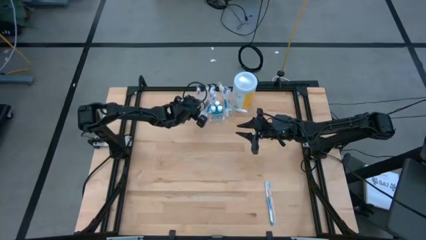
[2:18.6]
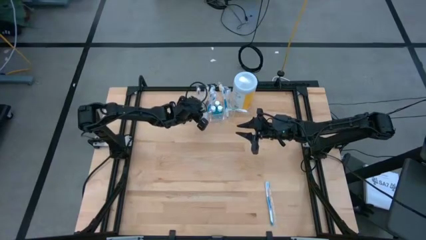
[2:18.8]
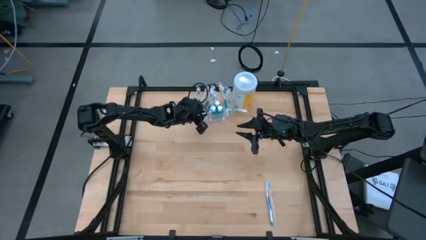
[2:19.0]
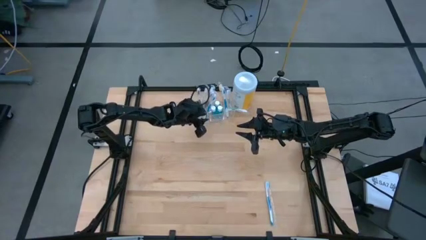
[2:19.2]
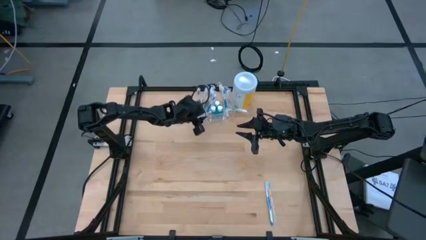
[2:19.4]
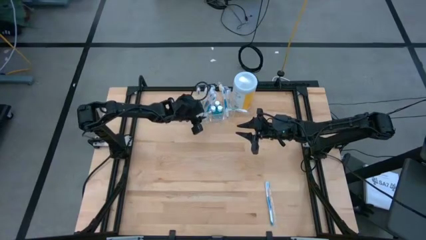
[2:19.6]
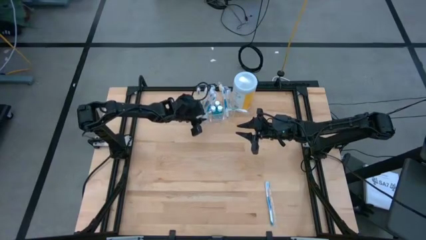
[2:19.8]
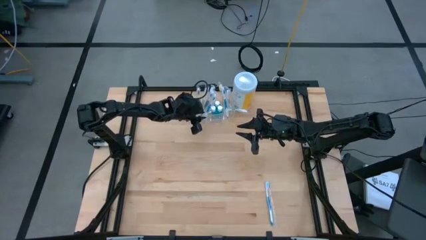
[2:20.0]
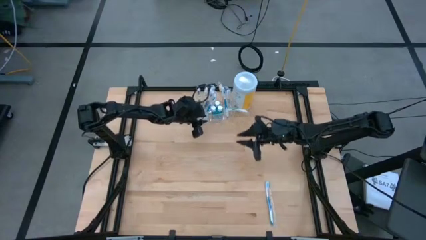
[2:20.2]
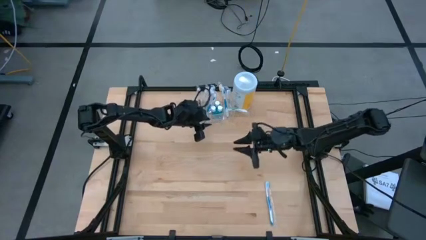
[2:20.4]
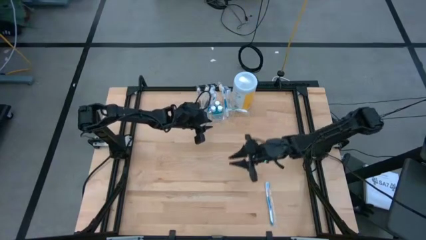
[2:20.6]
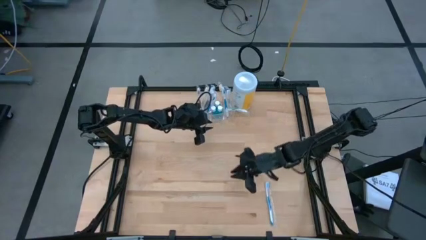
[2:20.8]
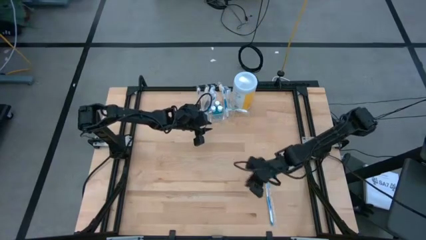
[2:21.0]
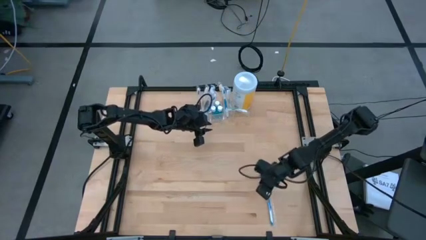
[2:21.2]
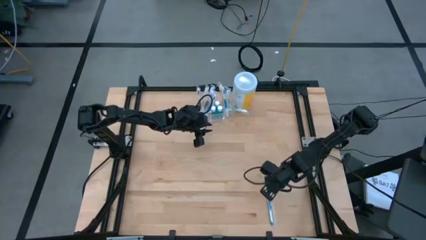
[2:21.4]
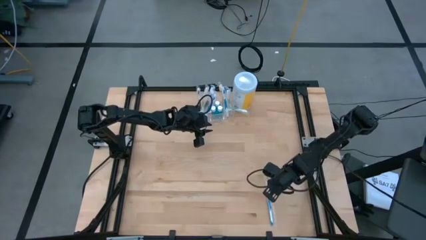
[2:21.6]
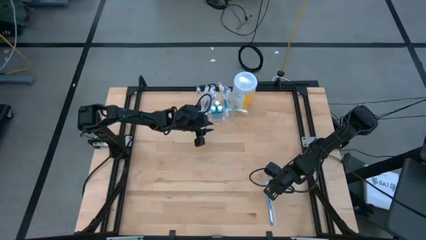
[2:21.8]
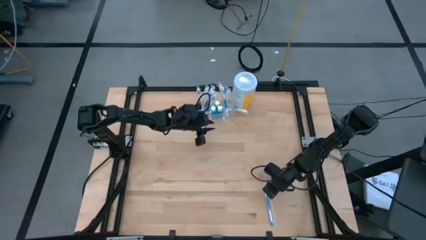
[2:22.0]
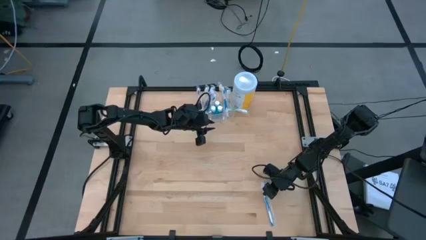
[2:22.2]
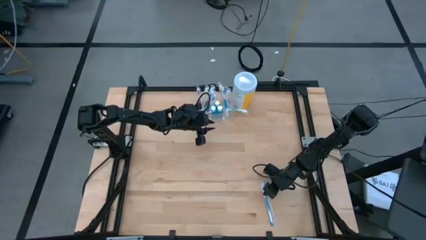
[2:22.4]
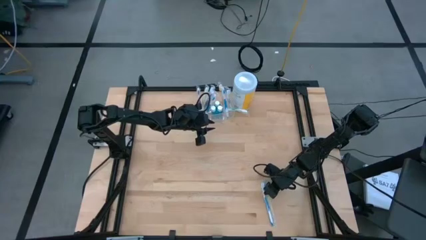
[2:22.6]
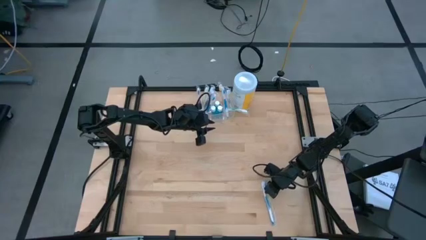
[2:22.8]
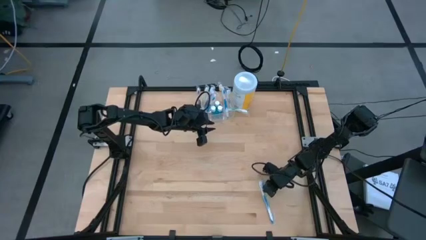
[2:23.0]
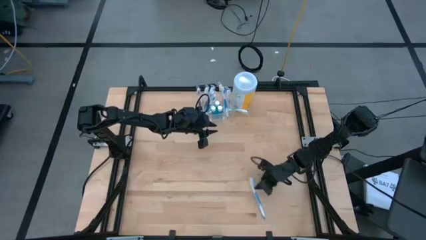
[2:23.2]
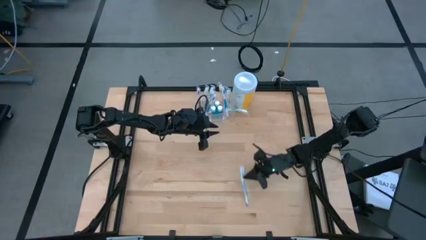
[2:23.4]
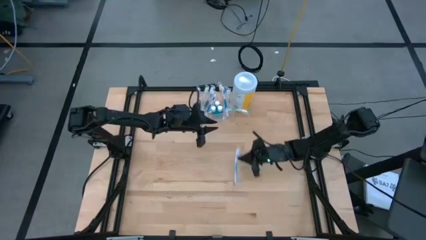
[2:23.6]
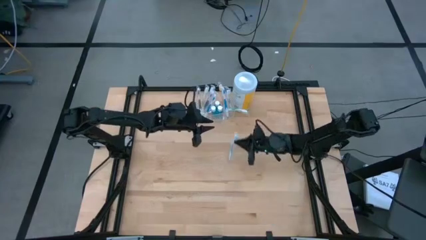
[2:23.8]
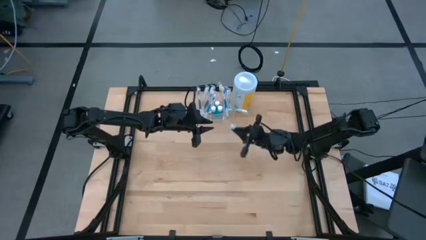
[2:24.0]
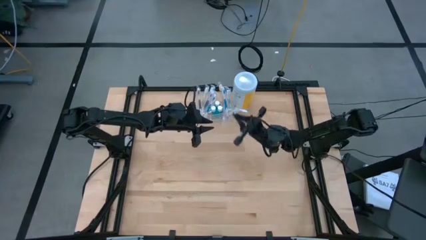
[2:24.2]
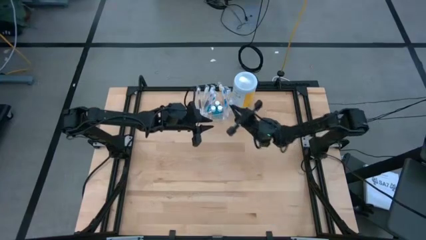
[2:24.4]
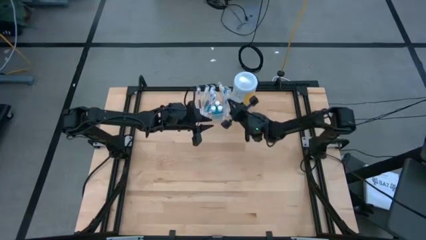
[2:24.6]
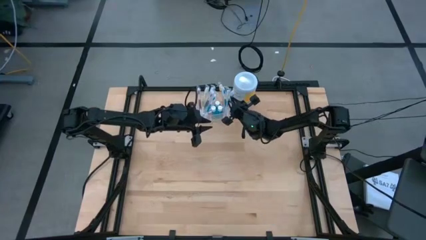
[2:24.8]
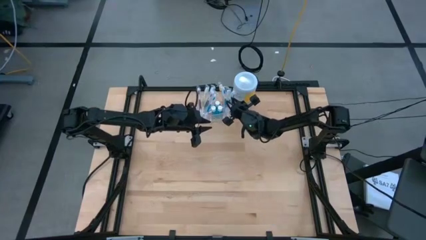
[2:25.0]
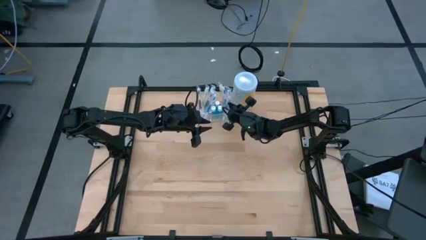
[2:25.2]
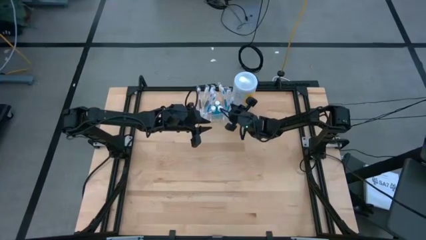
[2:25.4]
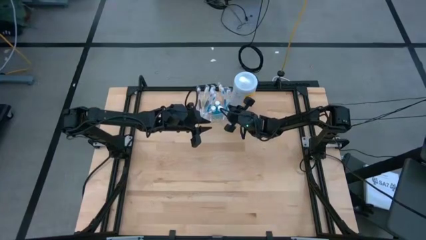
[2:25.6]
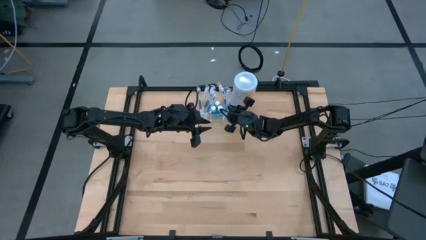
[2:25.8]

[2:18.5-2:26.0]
Task: Pick & Place toothbrushing station
Put the blue toothbrush into the transparent organizer

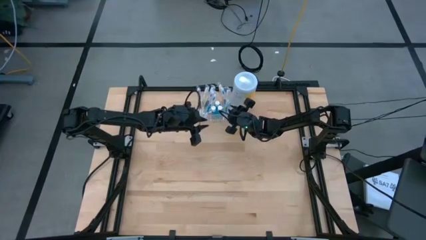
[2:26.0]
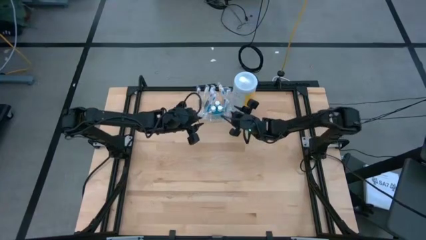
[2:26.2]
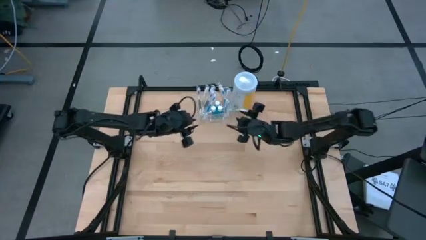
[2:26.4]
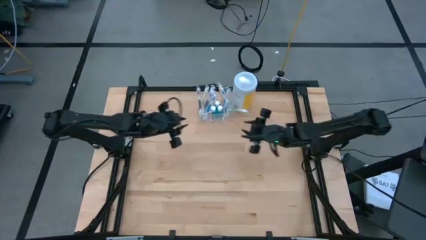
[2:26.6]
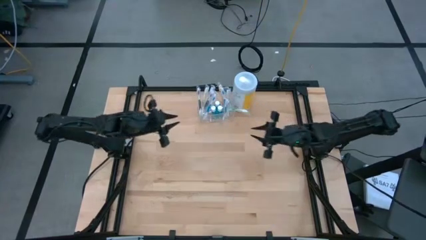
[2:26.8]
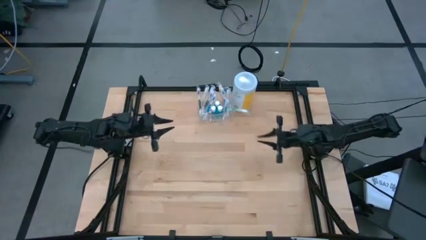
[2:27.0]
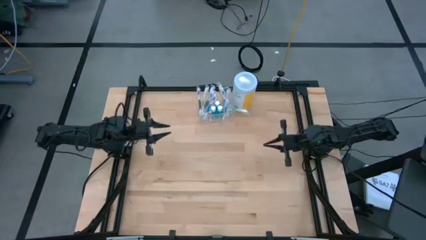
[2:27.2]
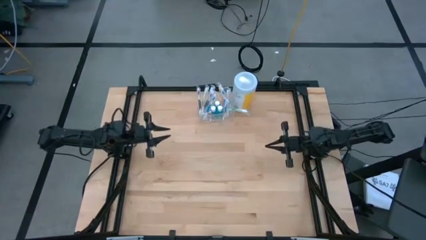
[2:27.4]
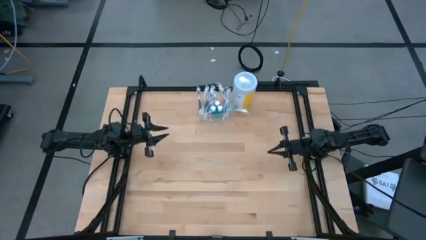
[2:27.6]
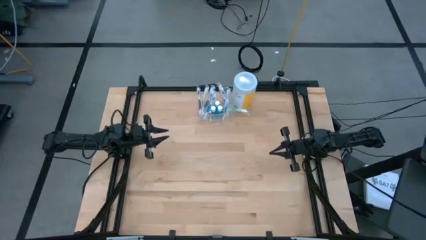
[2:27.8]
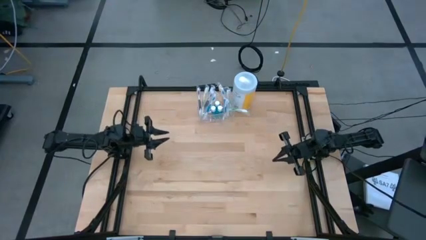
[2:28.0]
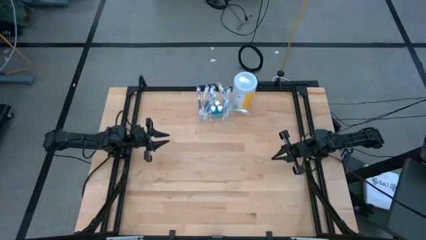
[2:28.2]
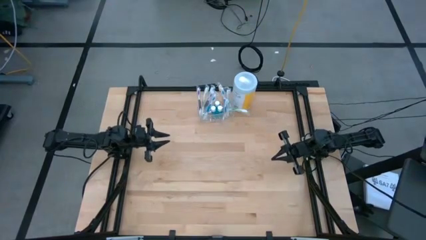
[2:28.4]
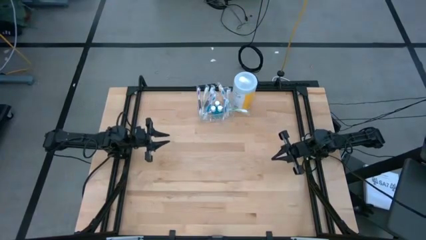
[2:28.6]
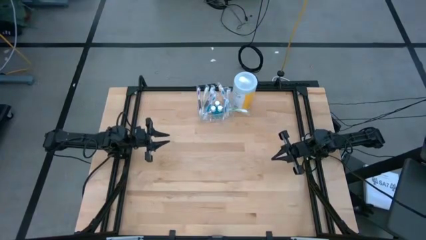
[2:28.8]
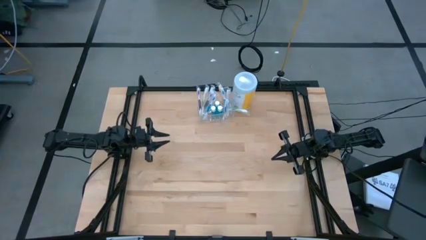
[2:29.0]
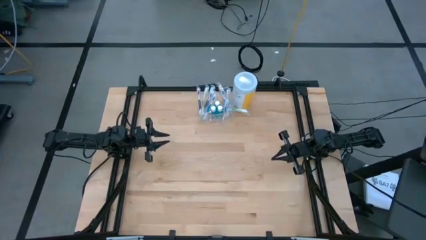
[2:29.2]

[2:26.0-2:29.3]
Return to Home Position
